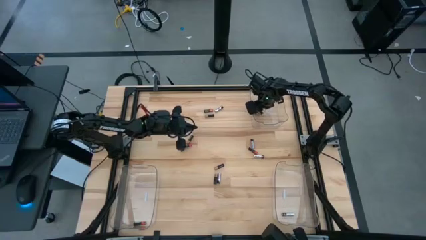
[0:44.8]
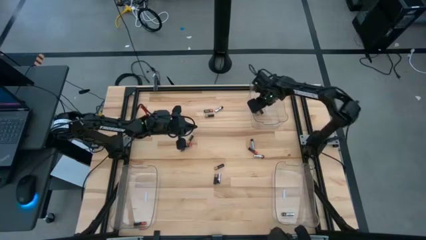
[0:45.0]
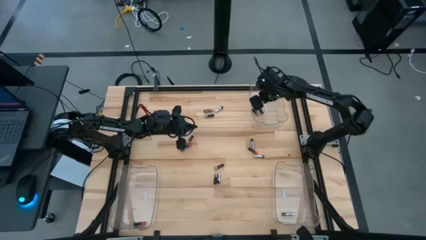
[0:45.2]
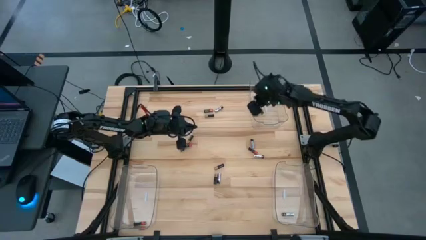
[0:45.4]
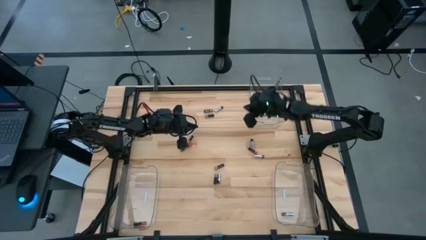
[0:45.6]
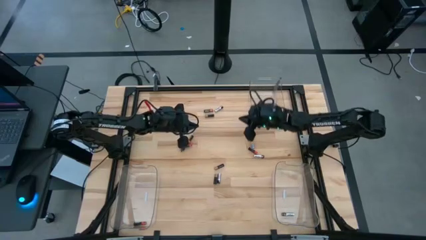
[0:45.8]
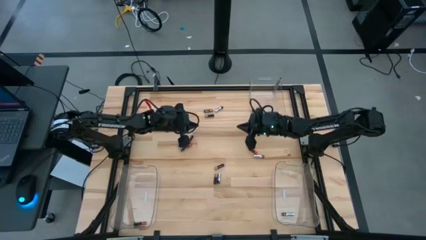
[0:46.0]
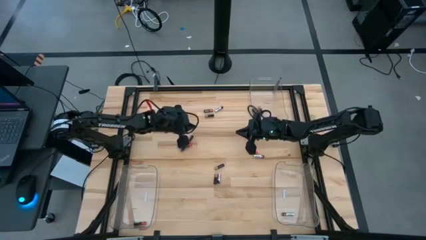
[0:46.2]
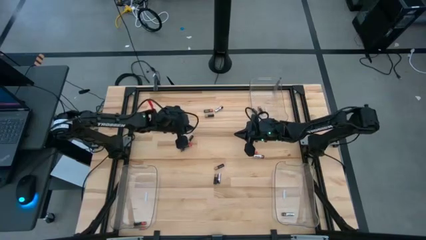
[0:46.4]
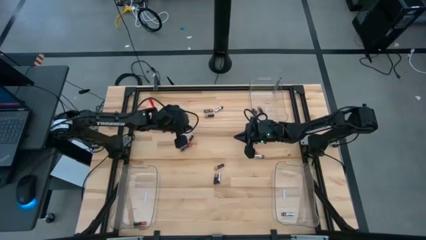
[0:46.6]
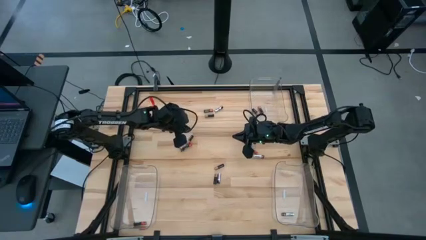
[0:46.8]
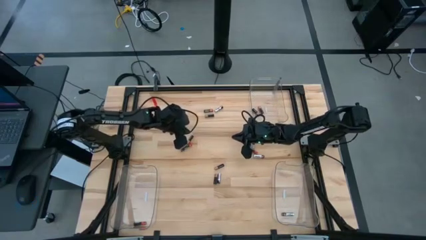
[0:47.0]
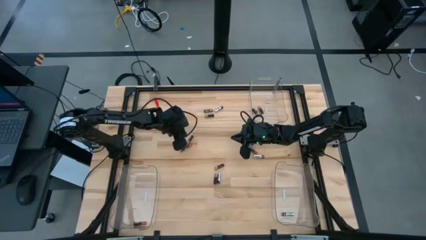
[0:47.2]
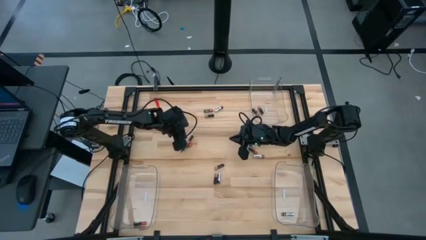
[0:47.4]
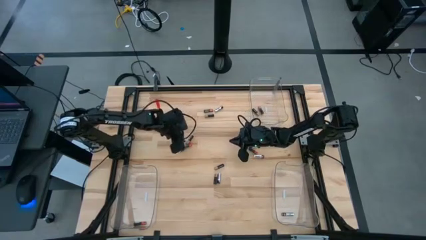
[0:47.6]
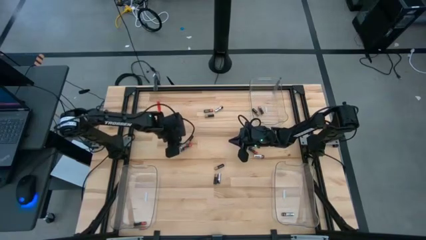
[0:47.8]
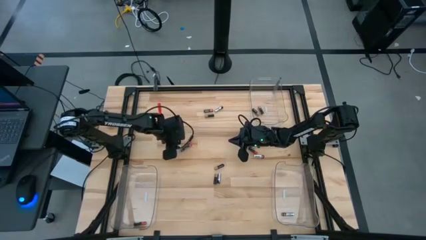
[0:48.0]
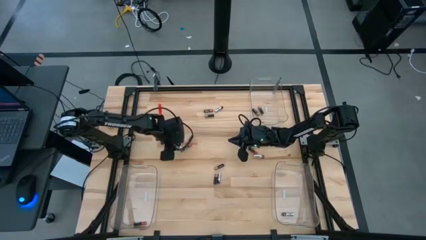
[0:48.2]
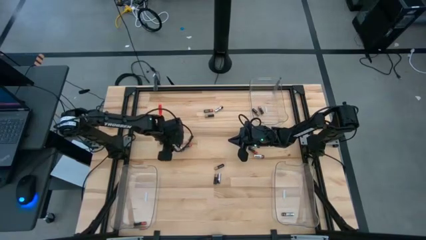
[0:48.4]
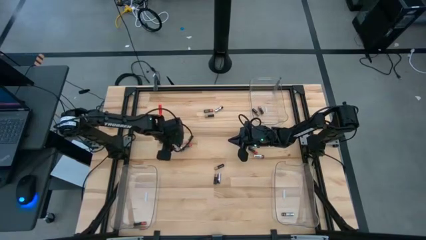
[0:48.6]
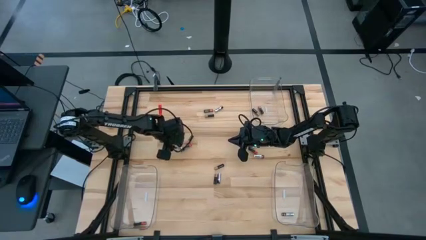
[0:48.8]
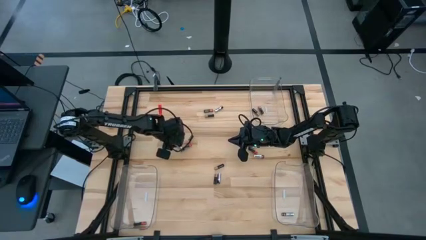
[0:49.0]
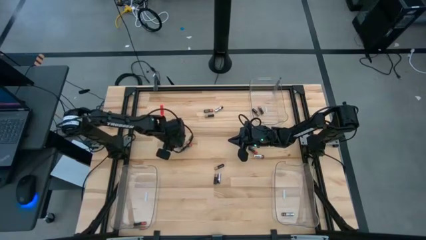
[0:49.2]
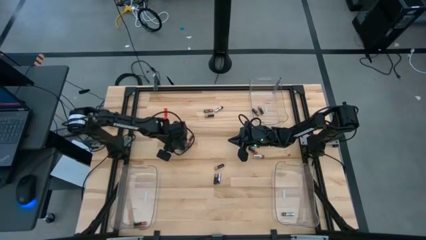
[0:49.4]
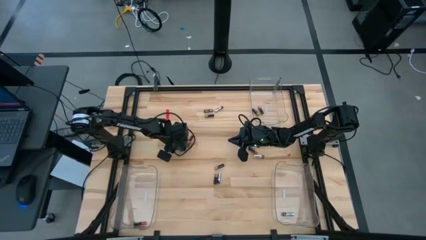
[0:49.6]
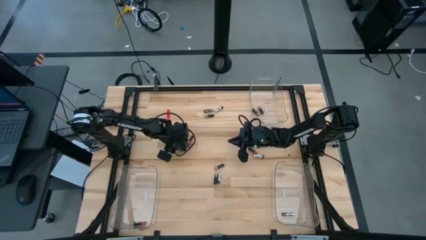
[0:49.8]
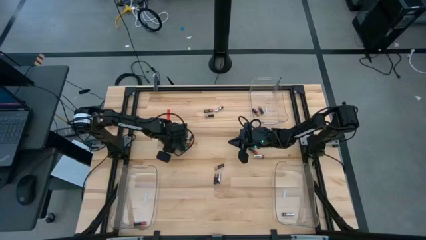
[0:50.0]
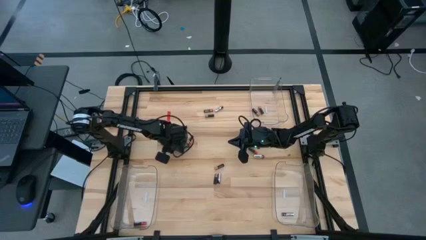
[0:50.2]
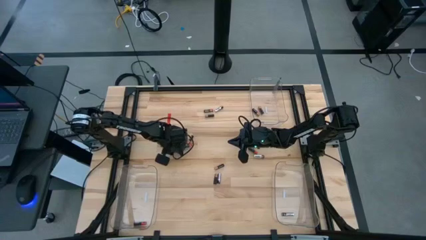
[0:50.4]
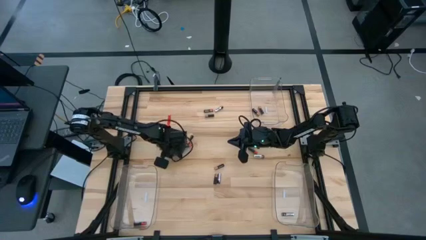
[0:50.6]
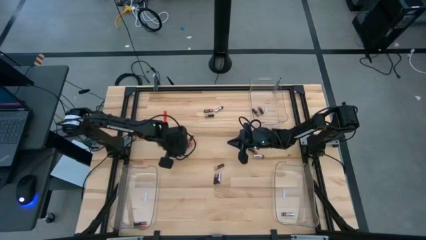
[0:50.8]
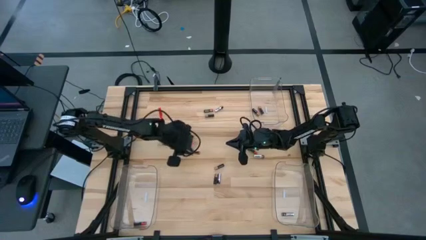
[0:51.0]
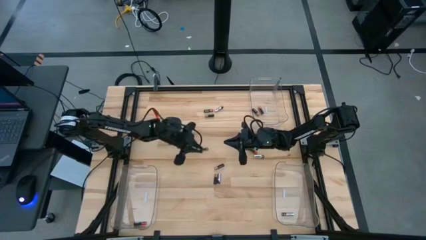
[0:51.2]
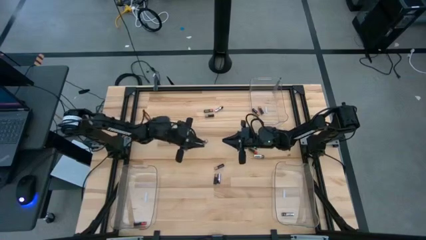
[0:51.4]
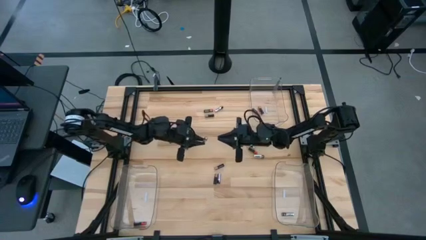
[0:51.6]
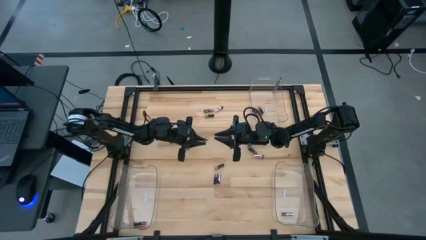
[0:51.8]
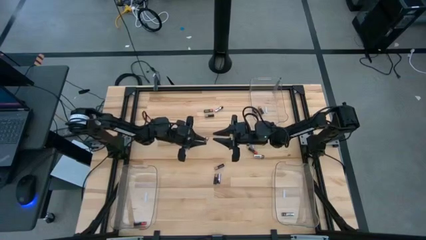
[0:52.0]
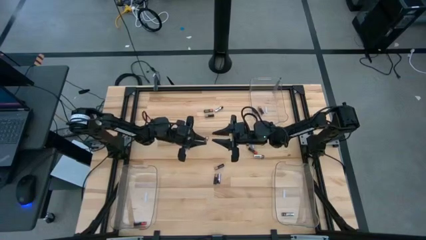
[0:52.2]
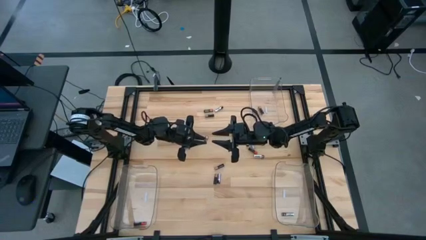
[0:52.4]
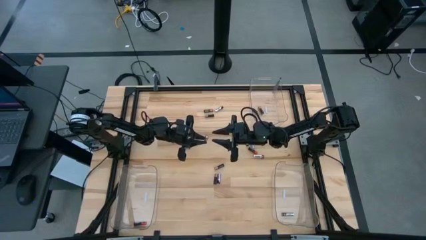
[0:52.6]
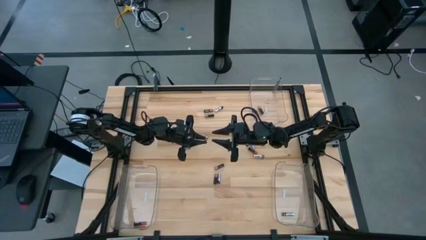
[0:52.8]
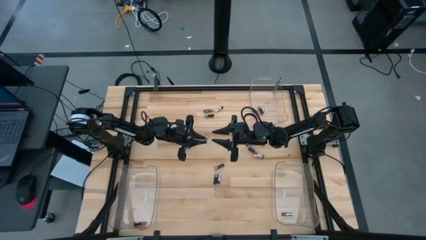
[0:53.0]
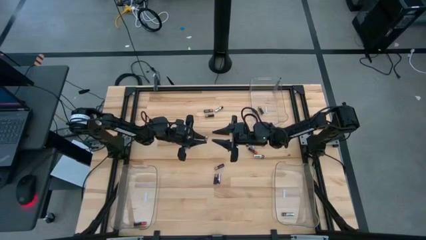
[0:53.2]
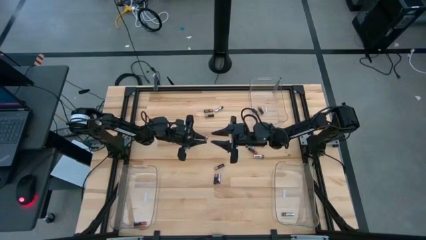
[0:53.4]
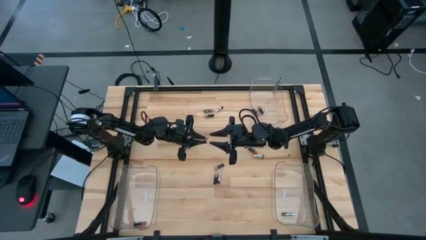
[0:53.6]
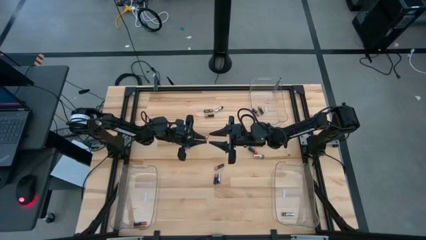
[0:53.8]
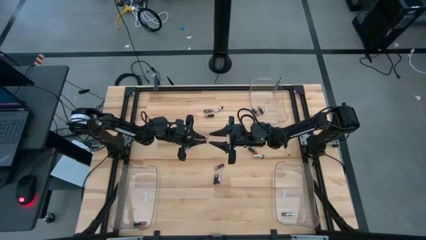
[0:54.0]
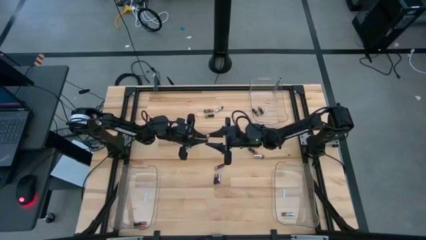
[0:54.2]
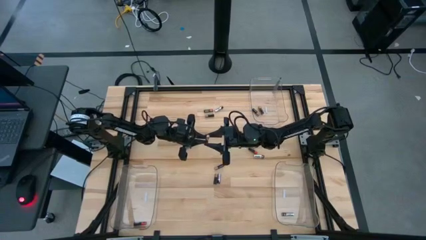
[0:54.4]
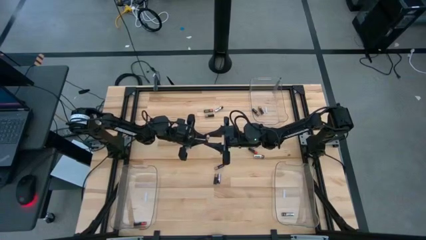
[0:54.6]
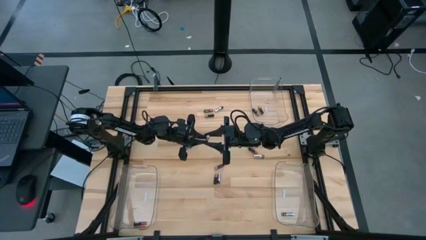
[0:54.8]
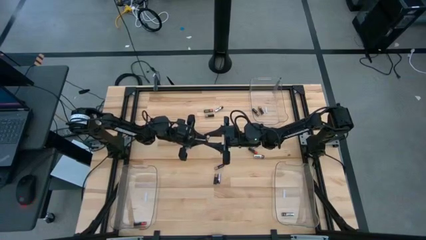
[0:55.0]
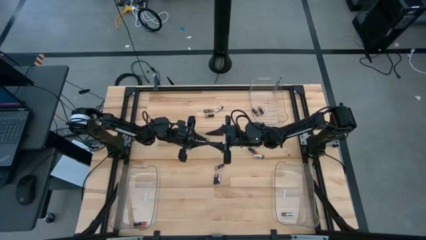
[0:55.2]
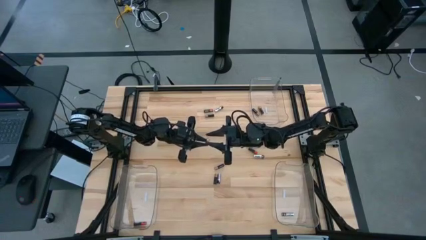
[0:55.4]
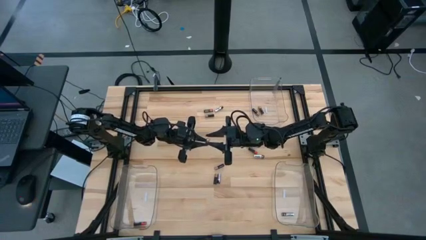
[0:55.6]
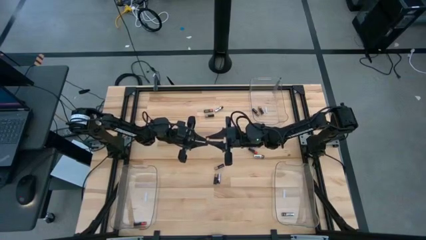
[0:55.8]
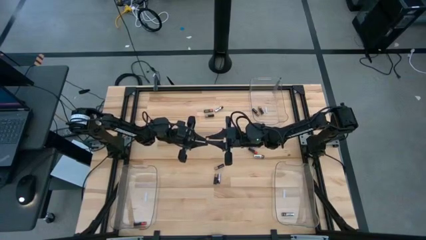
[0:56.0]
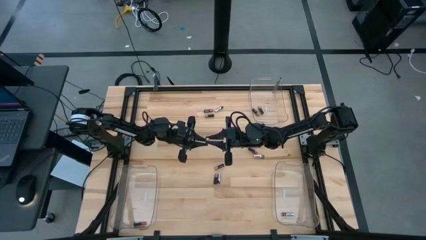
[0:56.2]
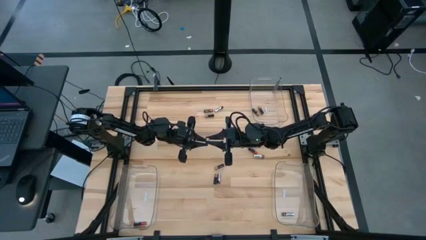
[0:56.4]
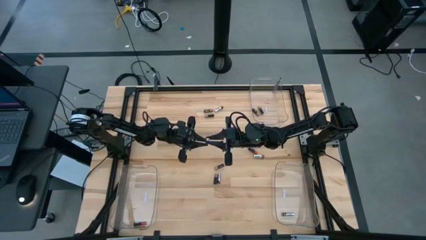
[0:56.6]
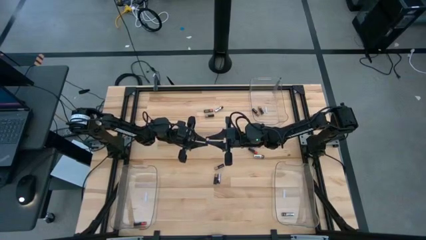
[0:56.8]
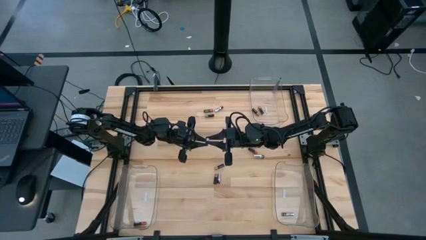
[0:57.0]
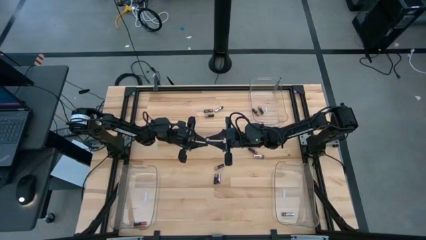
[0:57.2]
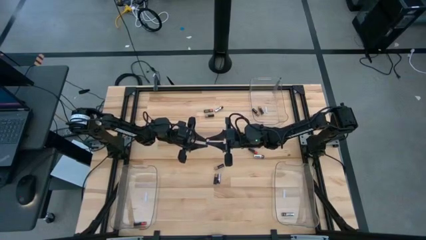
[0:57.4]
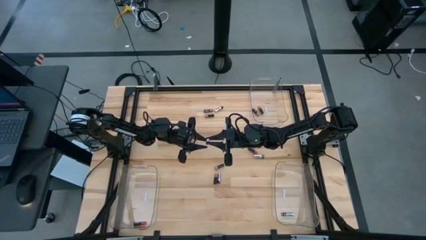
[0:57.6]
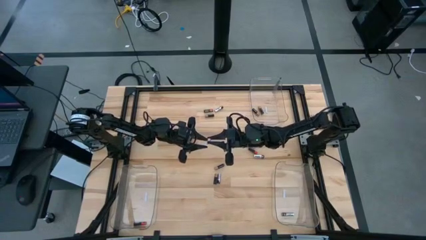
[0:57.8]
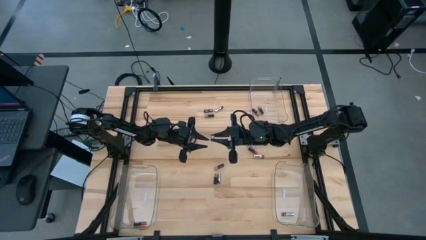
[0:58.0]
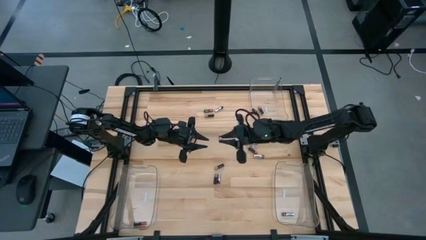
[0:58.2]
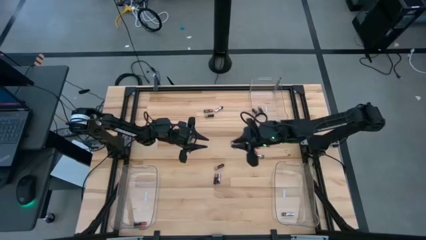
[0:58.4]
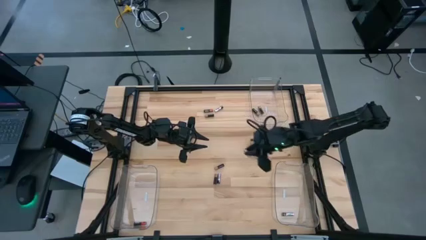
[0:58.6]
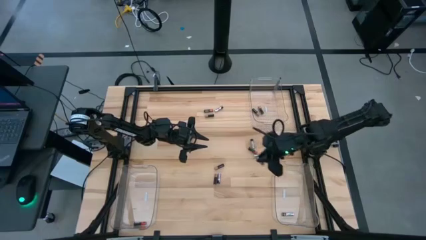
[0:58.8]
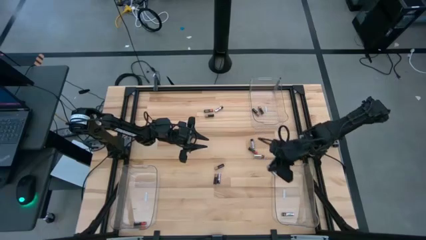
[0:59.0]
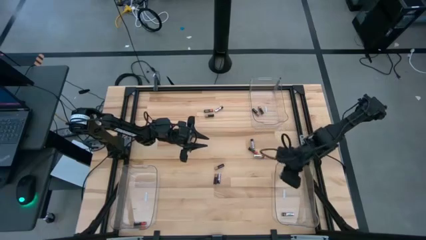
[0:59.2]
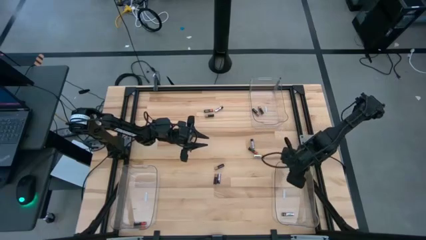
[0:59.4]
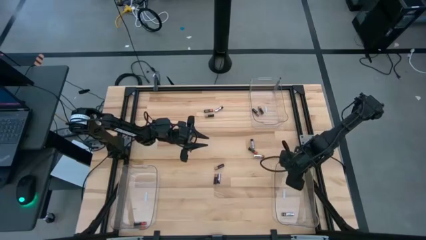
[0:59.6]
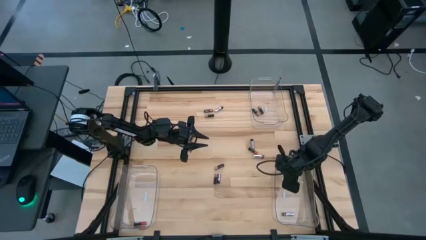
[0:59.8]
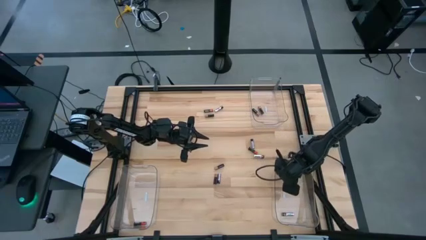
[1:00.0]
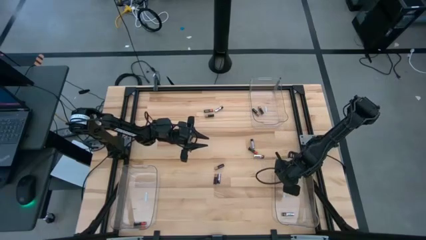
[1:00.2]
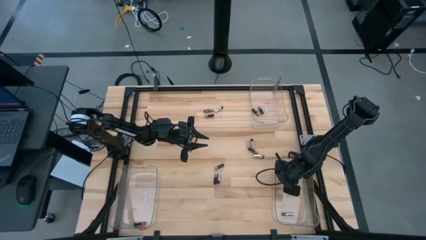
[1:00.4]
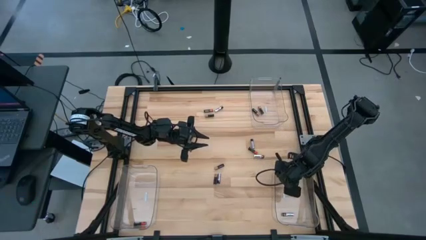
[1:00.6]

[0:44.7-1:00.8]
Task: Sort batteries
Put the white battery into the bottom right transparent bin

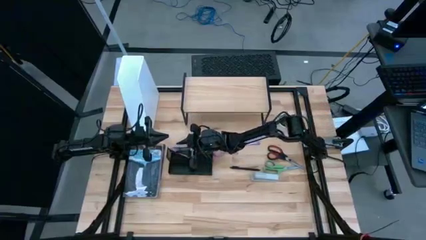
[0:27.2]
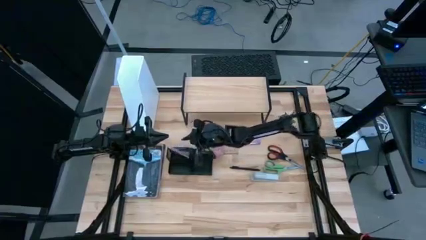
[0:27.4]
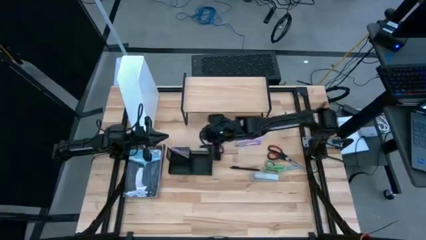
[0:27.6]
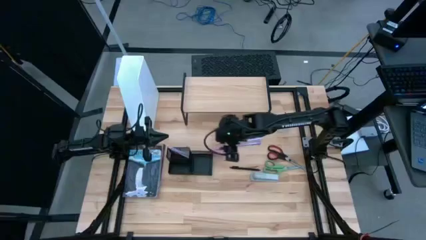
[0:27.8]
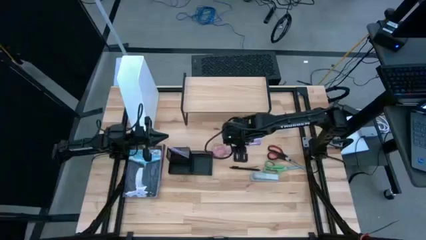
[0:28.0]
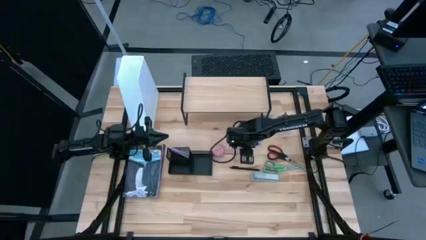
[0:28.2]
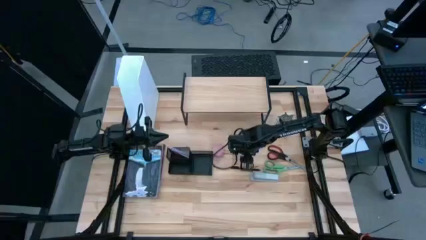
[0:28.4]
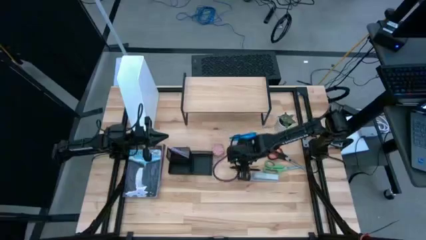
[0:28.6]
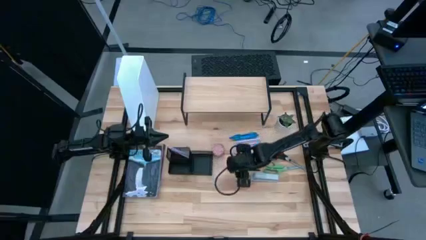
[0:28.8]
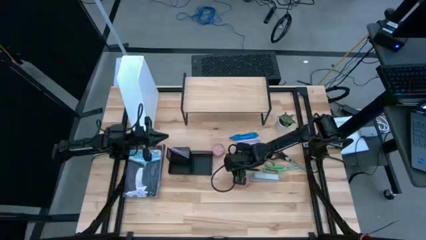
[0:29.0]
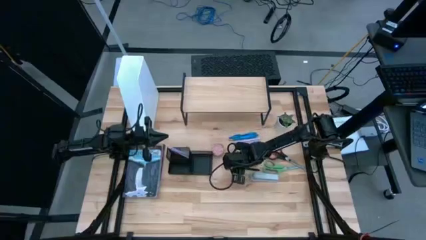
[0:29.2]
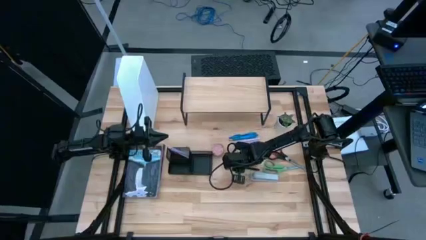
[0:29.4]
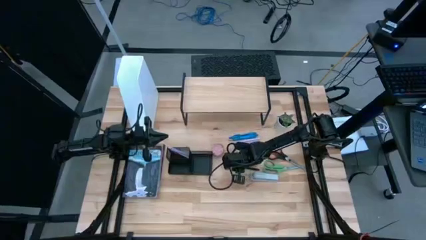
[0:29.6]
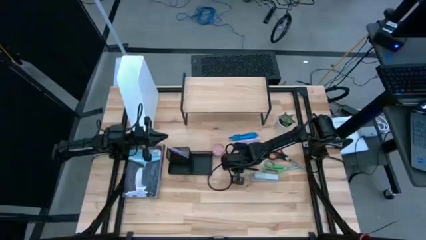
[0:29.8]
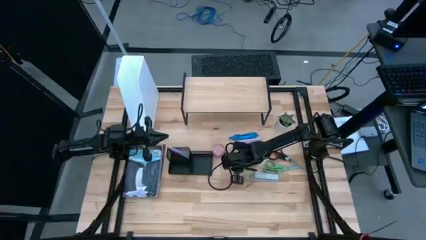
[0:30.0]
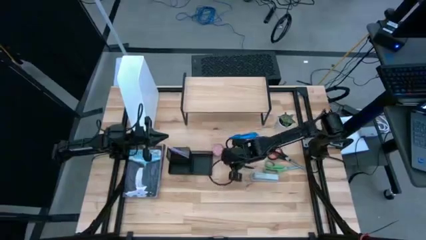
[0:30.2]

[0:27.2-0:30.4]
Task: Stock shelves
Put the black pen into the desk organizer
